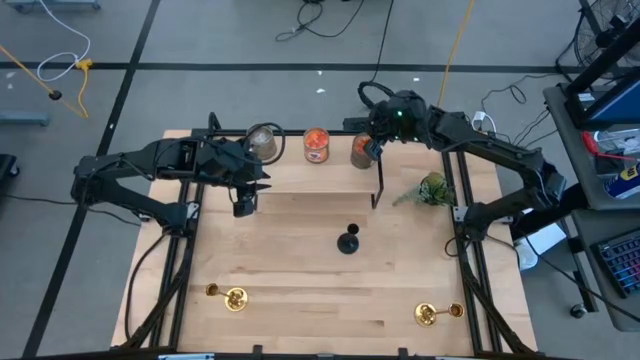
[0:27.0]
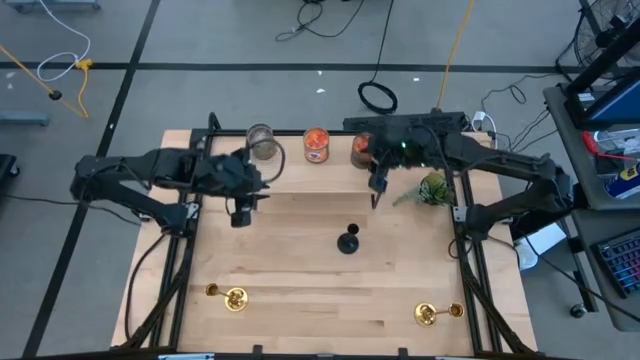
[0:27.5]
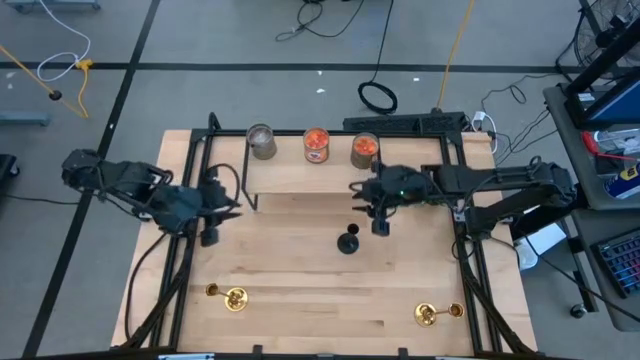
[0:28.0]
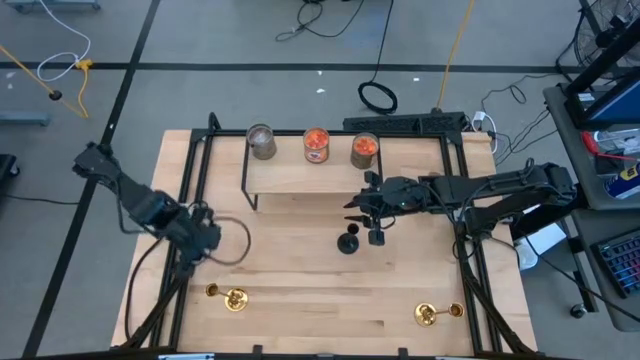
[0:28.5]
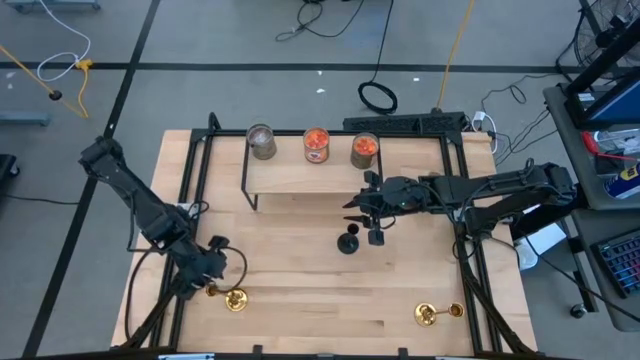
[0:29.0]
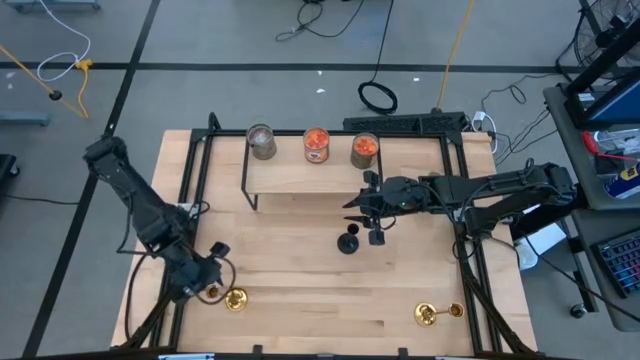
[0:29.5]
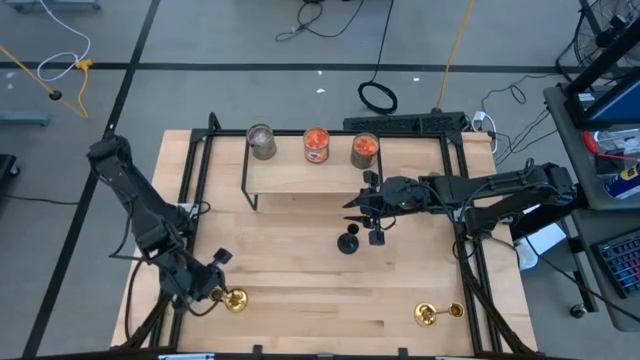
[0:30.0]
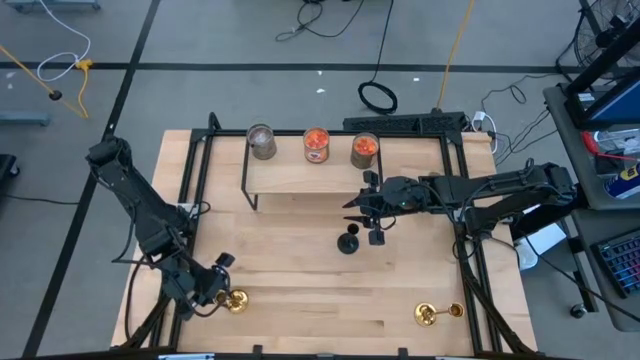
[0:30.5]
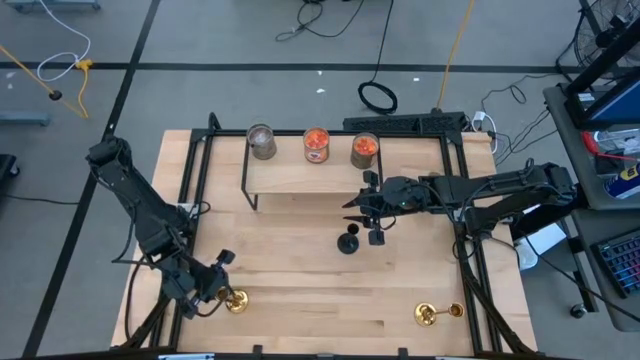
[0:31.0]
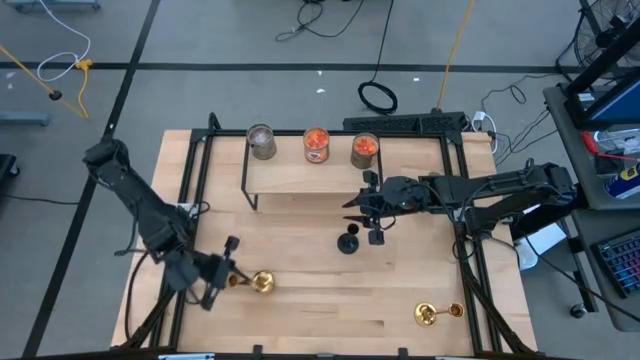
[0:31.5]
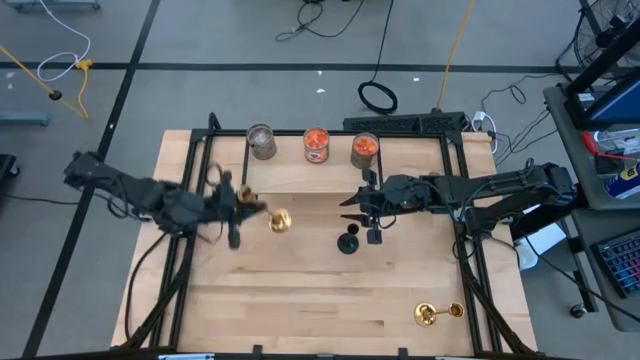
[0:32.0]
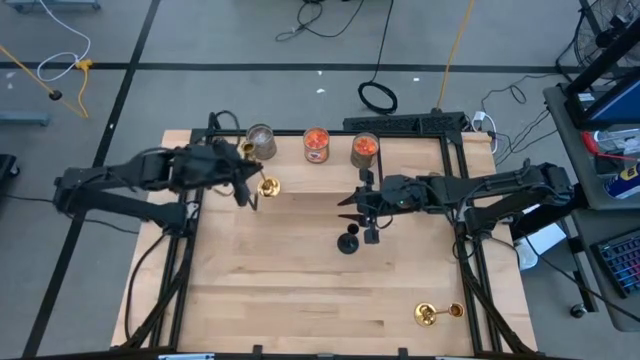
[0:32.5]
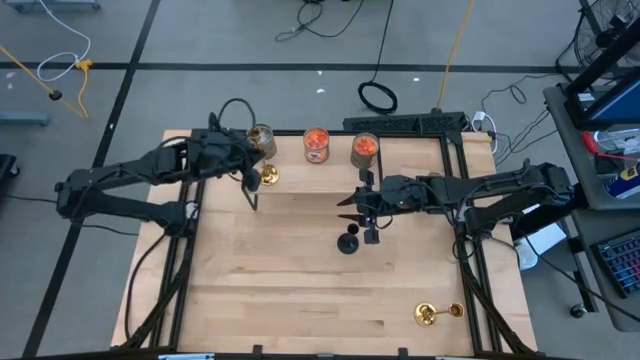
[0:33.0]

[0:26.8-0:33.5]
Task: Pick & Place candle stick holders
Put the left gold candle holder on the shelf

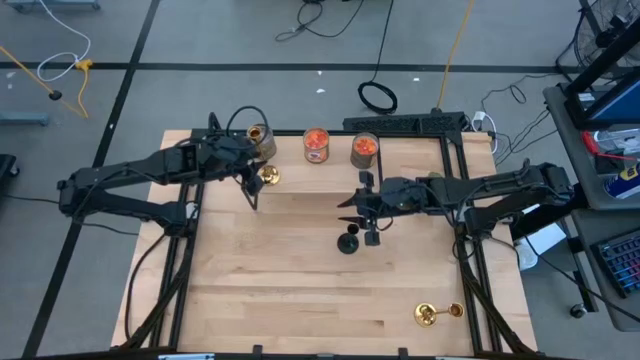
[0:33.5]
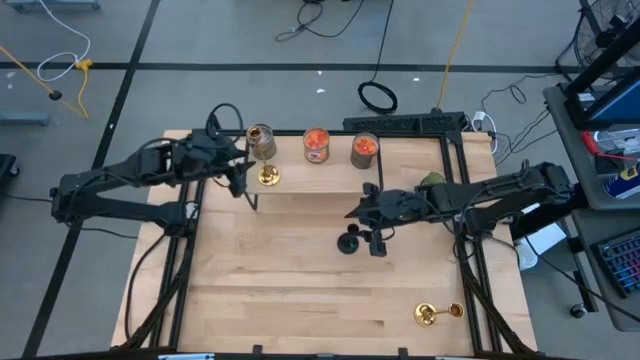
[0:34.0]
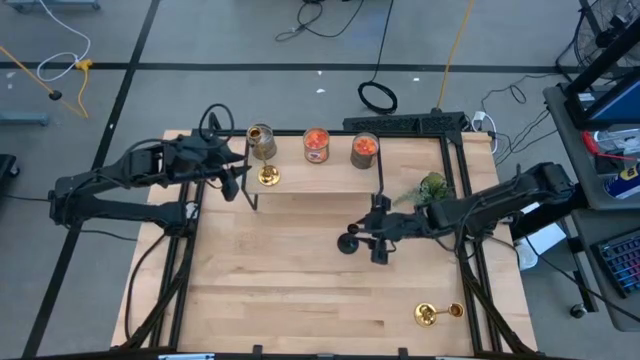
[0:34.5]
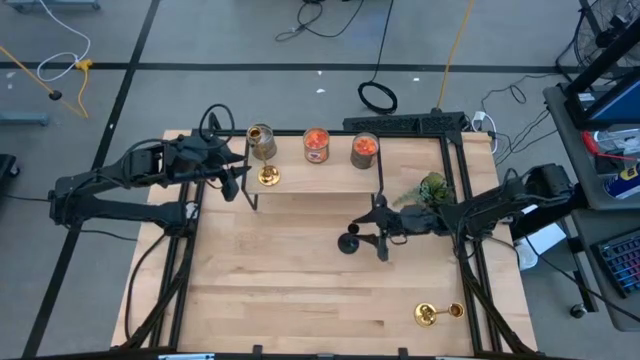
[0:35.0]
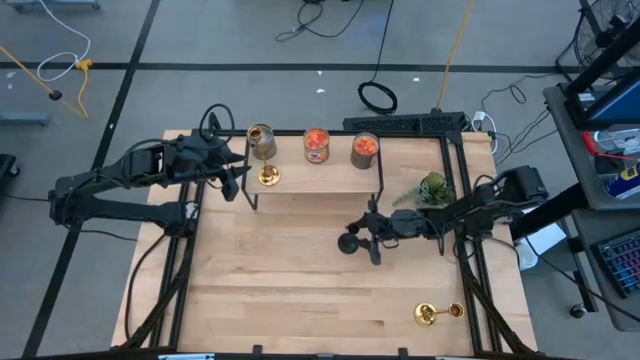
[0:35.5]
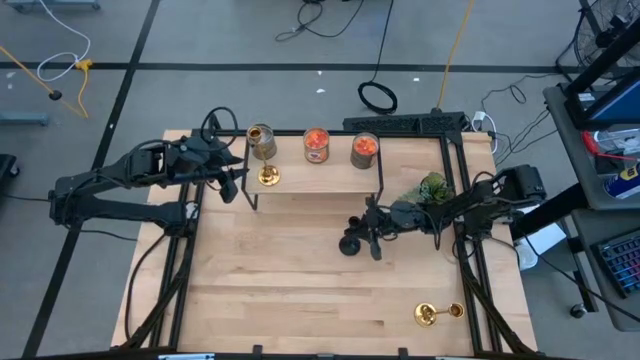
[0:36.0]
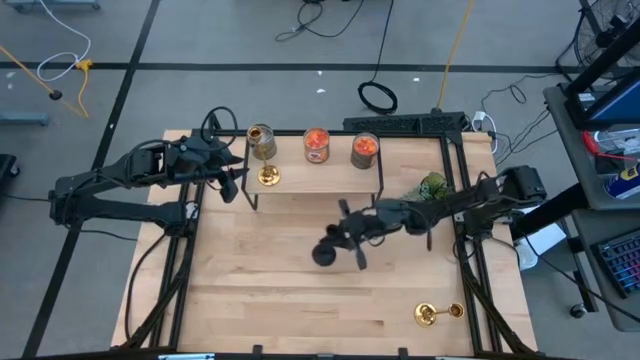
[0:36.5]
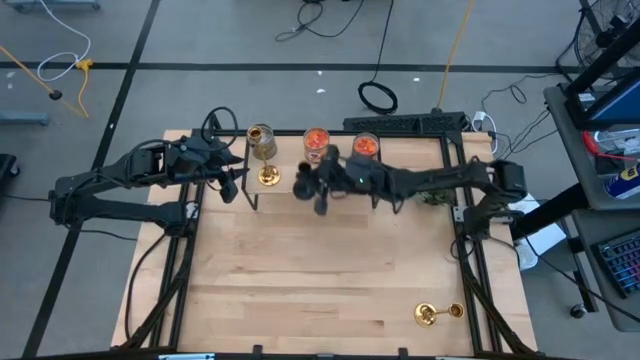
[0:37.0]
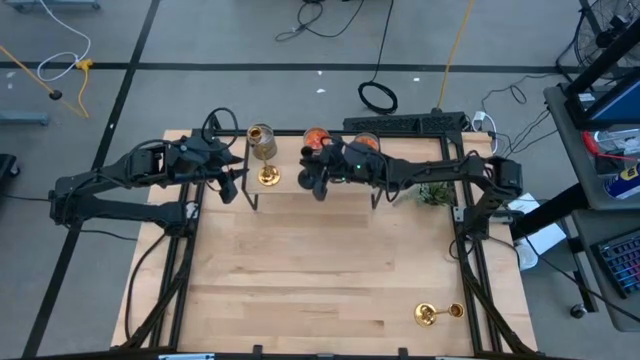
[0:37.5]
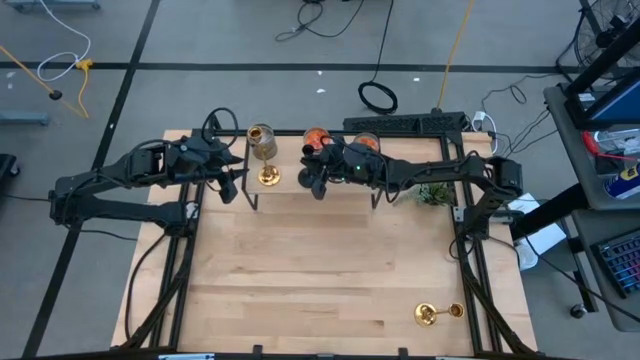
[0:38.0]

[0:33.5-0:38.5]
Put the black candle holder on the shelf

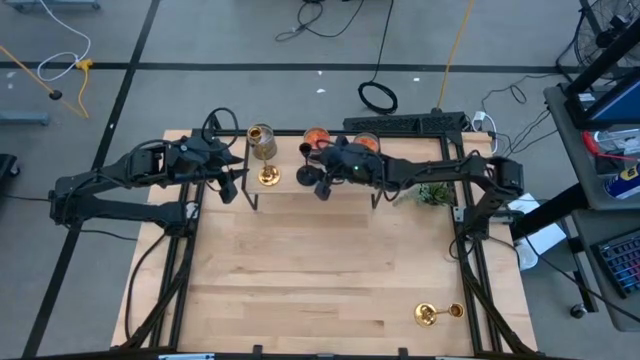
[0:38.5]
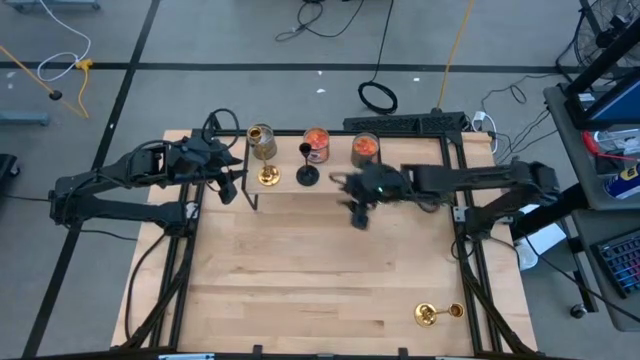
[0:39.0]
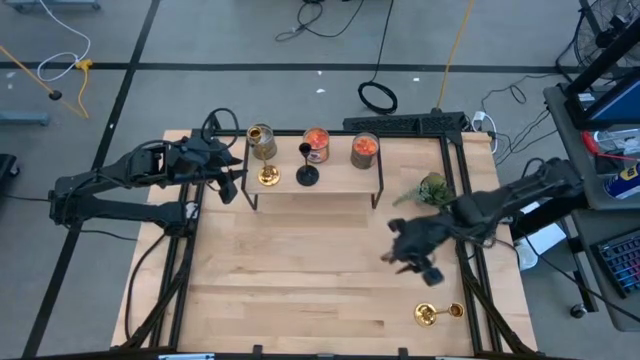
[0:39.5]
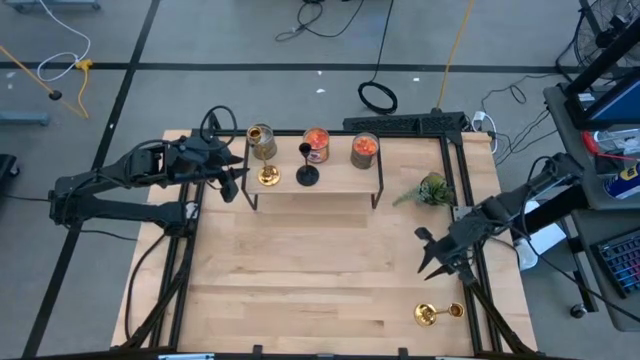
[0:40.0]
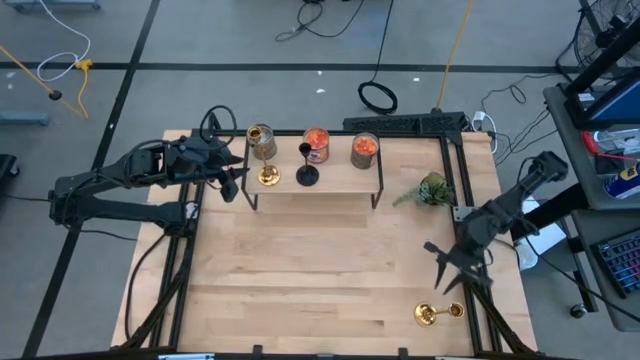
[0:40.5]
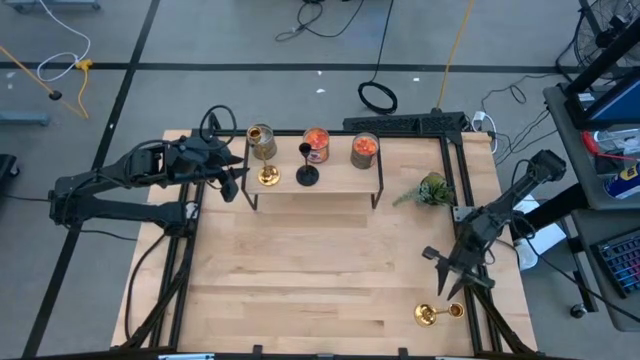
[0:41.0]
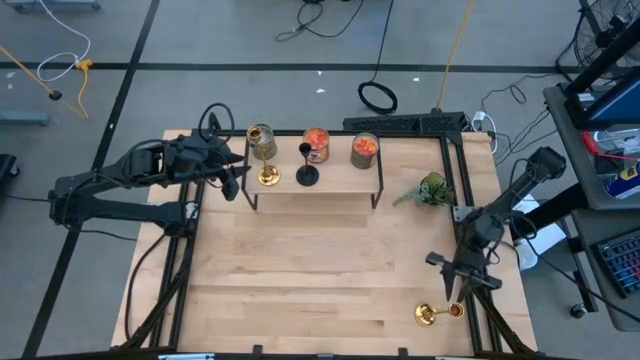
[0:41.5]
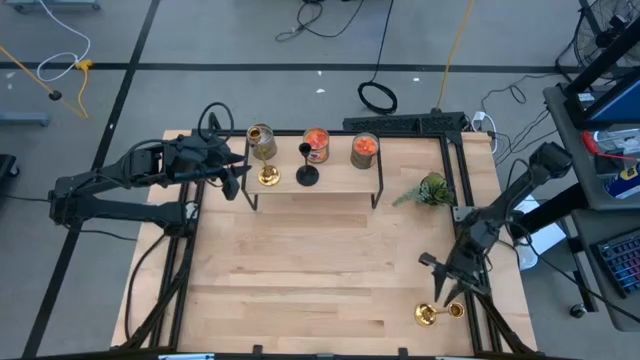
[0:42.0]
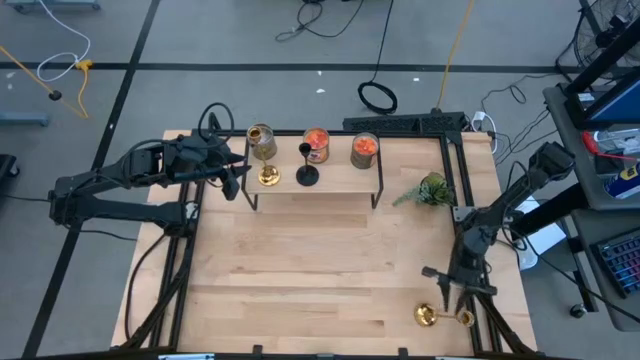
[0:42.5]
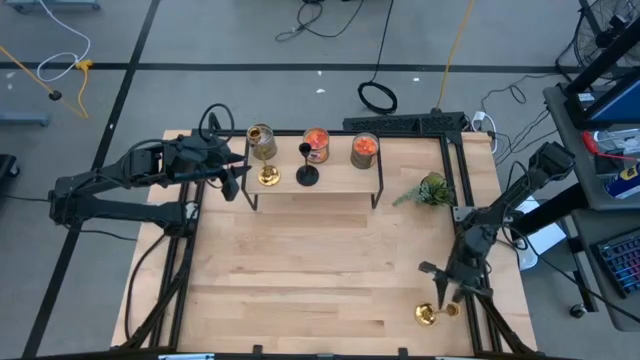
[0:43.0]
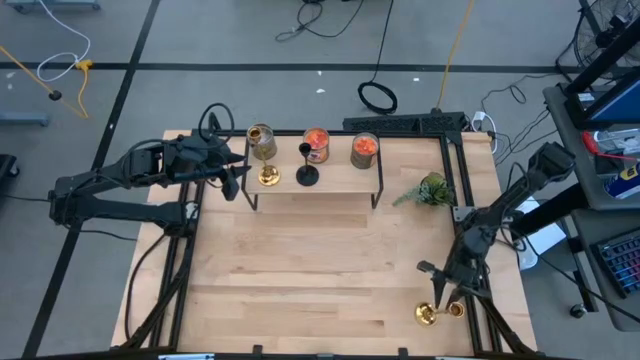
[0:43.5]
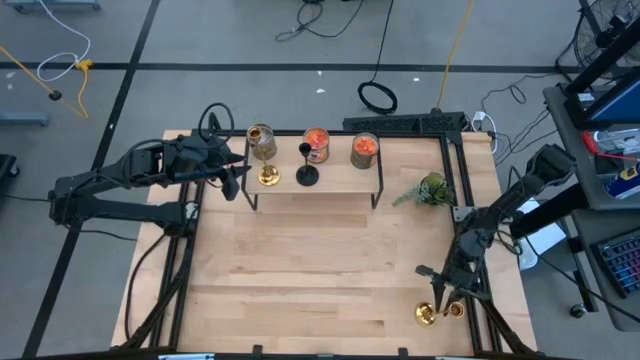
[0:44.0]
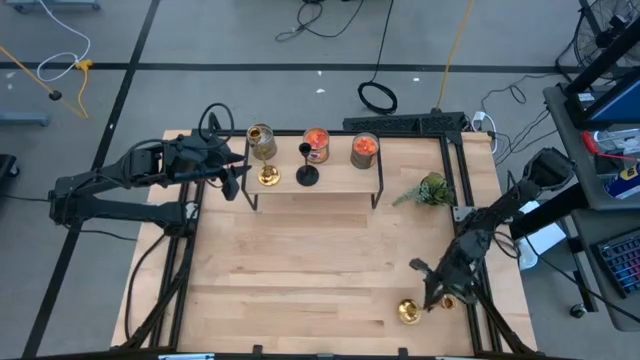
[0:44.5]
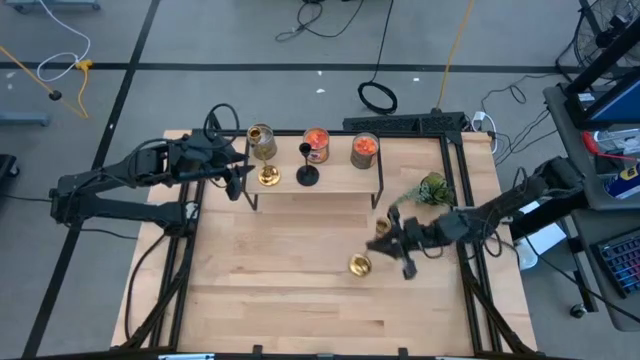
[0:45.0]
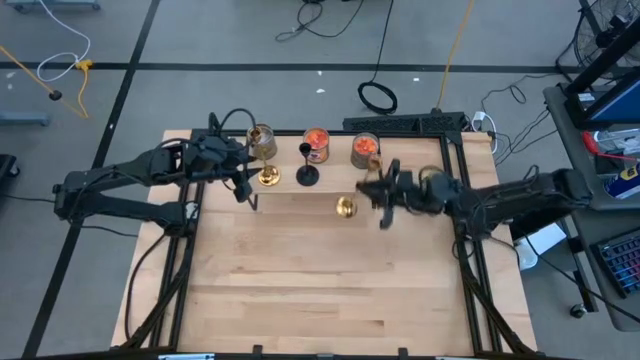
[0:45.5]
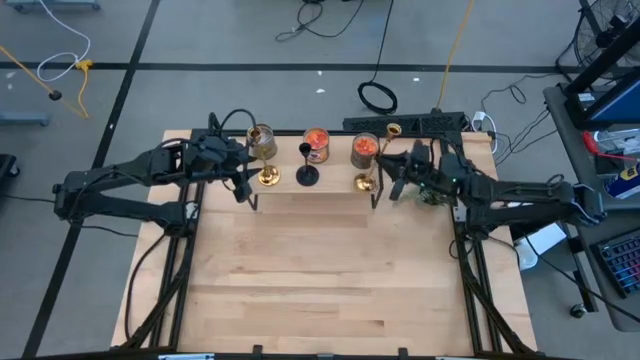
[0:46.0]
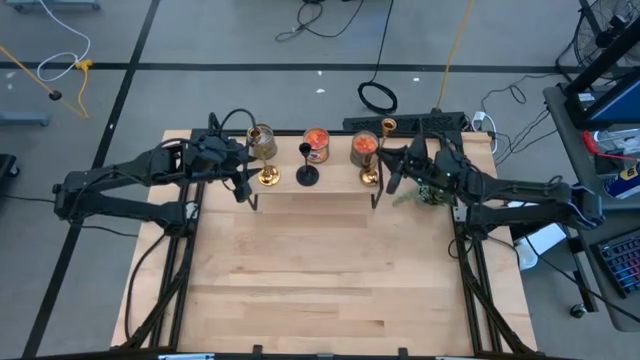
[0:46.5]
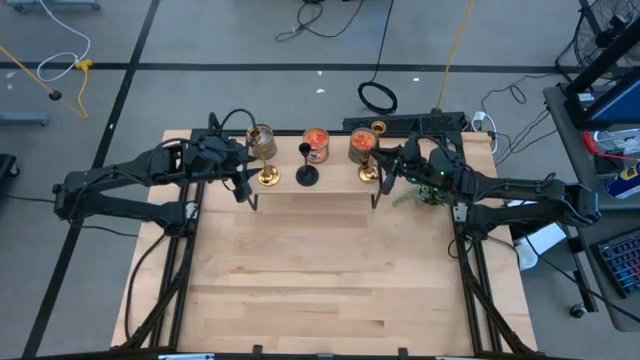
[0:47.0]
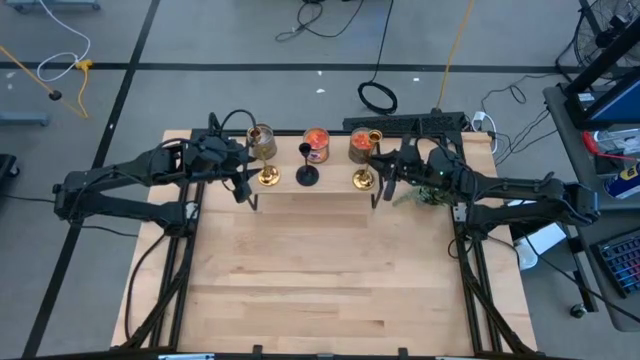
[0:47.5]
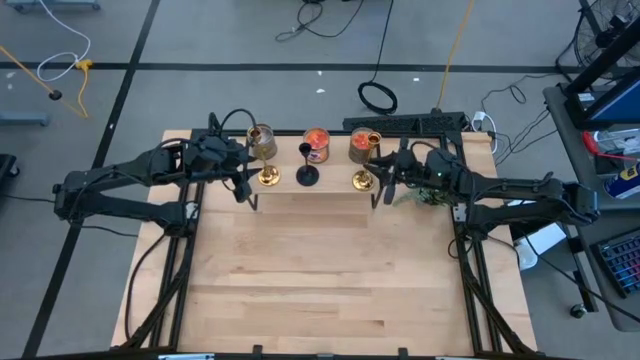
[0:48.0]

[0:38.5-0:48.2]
Put the gold candle holder on the shelf
